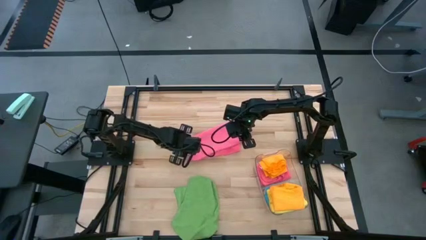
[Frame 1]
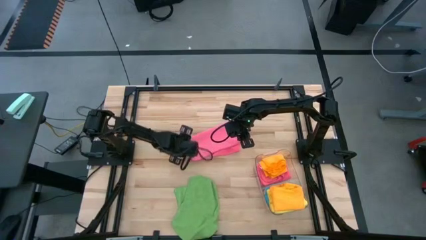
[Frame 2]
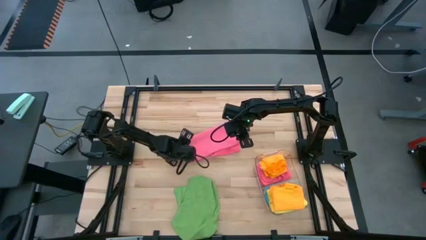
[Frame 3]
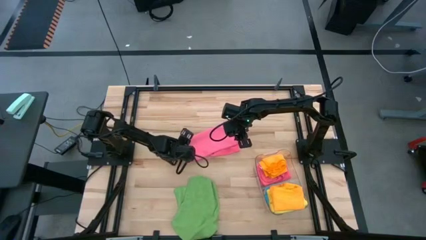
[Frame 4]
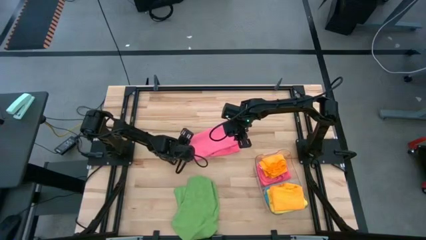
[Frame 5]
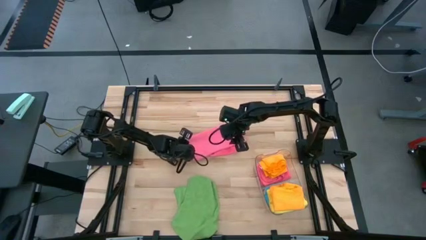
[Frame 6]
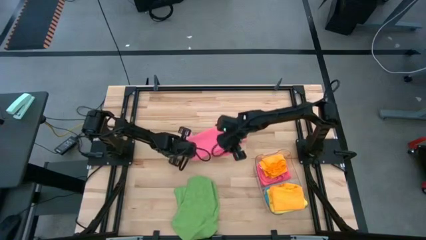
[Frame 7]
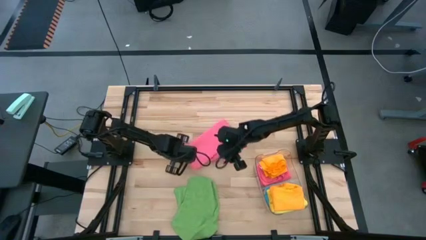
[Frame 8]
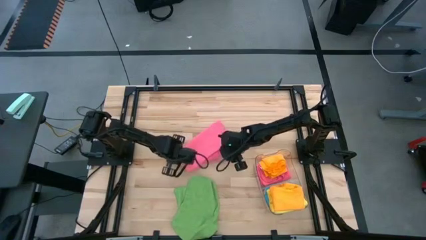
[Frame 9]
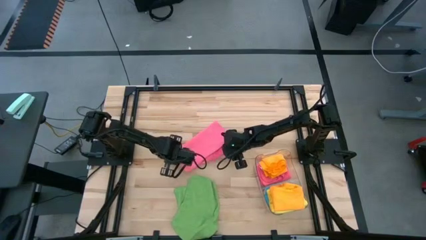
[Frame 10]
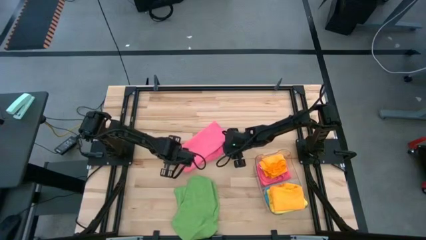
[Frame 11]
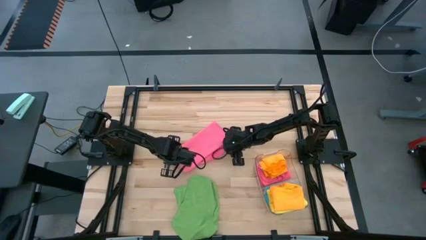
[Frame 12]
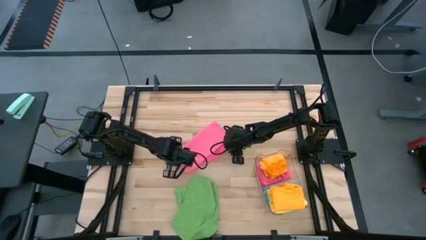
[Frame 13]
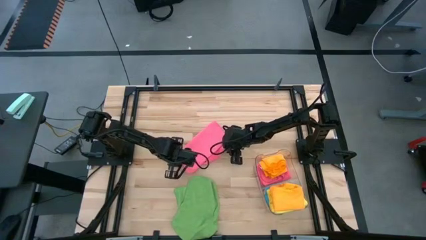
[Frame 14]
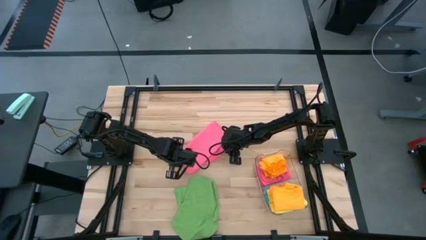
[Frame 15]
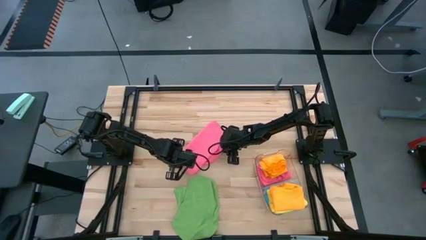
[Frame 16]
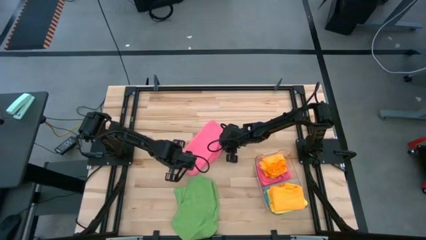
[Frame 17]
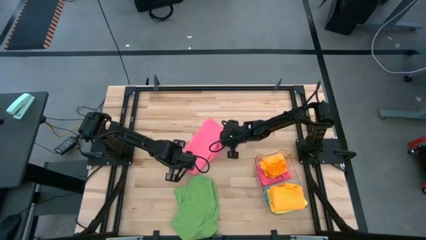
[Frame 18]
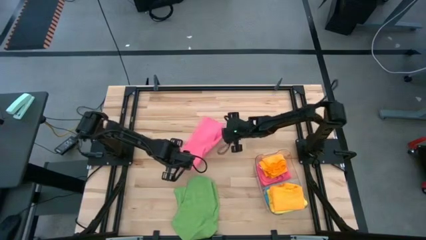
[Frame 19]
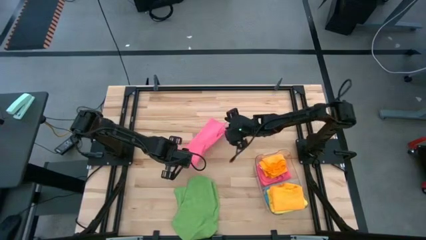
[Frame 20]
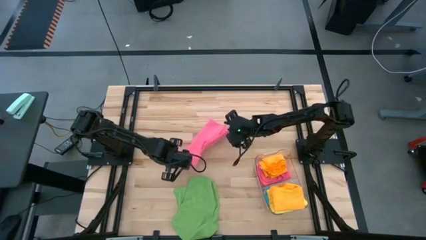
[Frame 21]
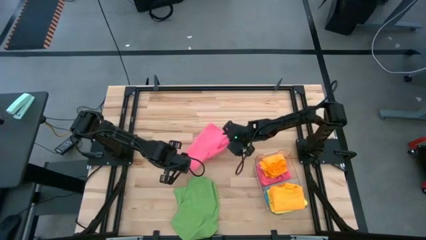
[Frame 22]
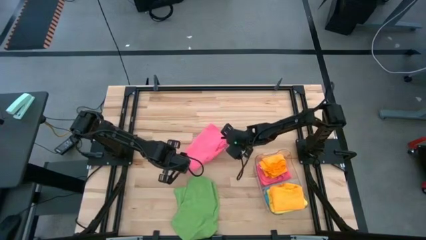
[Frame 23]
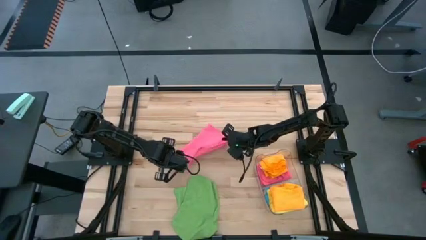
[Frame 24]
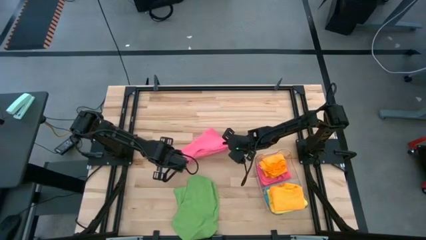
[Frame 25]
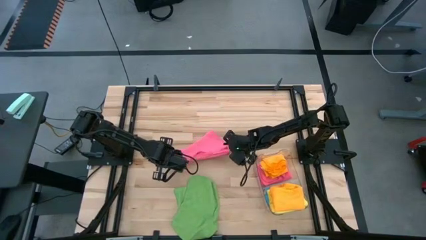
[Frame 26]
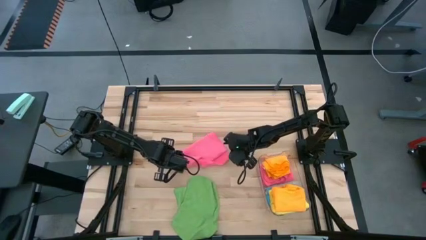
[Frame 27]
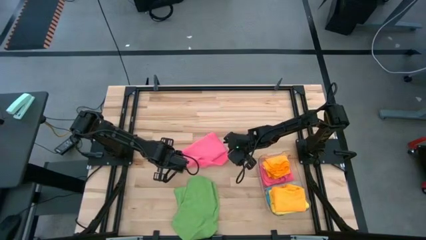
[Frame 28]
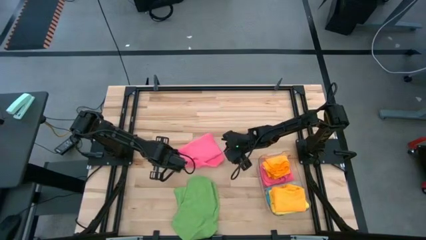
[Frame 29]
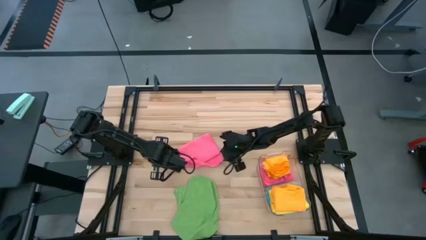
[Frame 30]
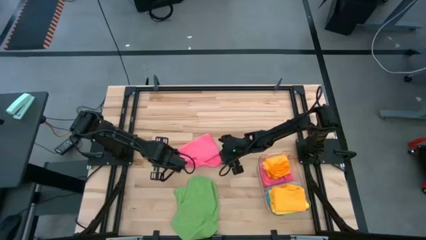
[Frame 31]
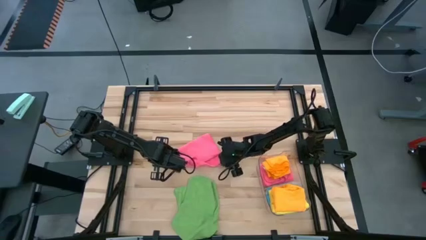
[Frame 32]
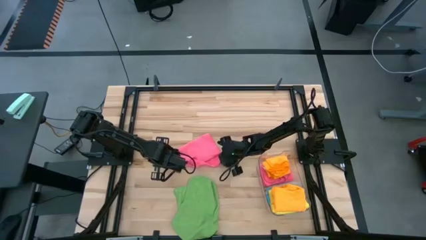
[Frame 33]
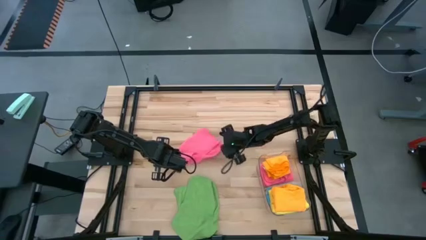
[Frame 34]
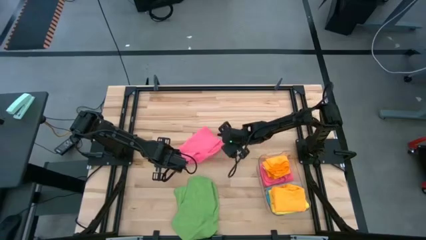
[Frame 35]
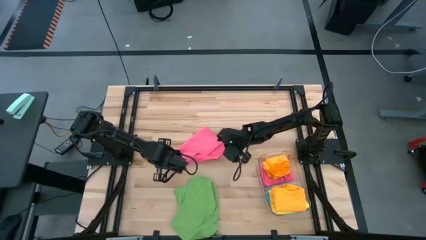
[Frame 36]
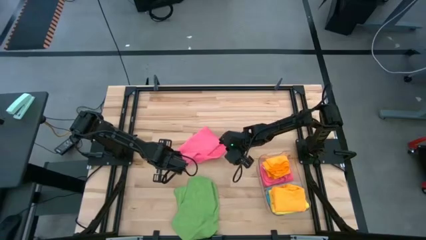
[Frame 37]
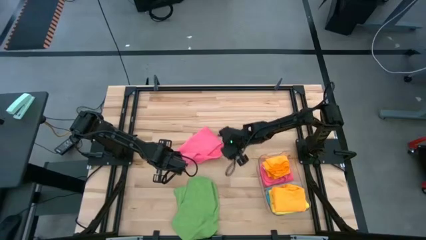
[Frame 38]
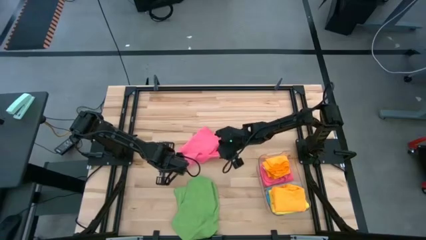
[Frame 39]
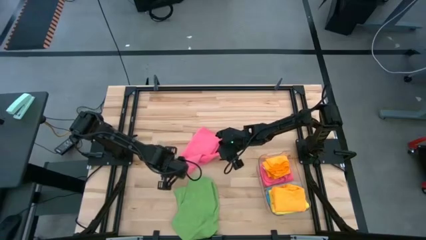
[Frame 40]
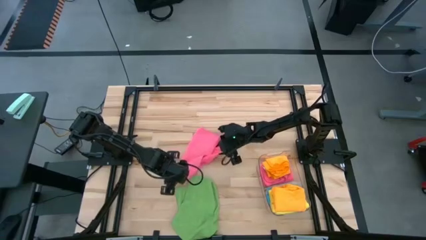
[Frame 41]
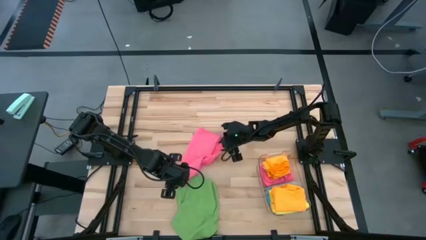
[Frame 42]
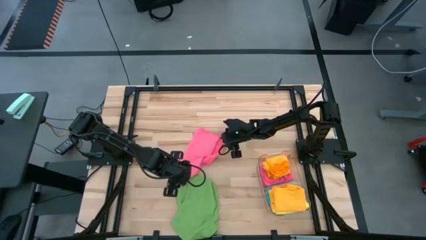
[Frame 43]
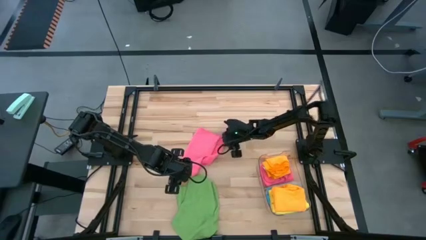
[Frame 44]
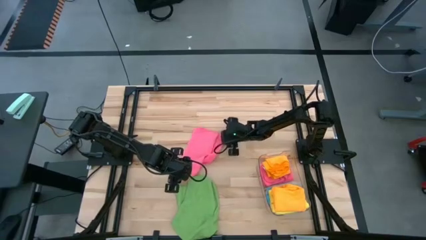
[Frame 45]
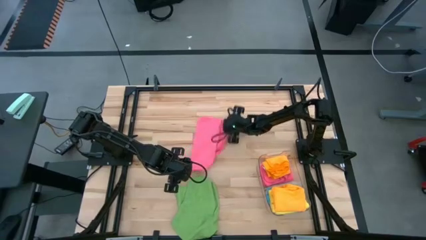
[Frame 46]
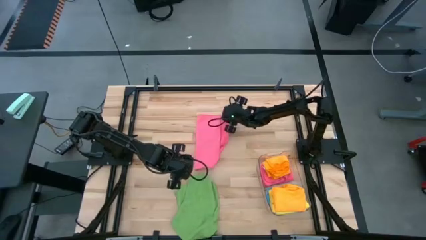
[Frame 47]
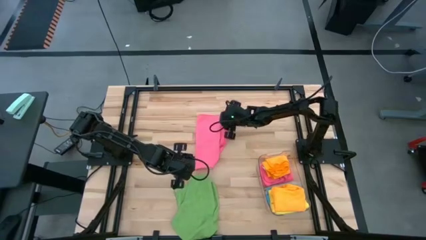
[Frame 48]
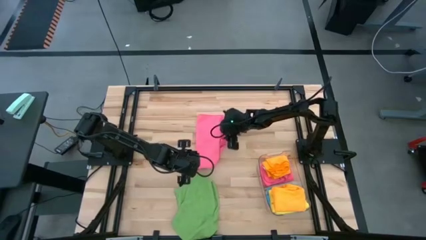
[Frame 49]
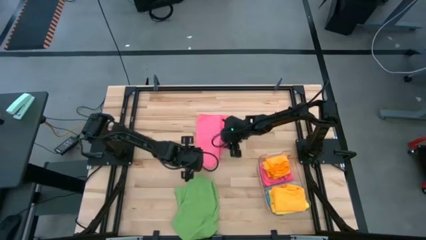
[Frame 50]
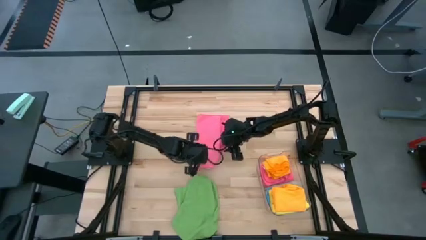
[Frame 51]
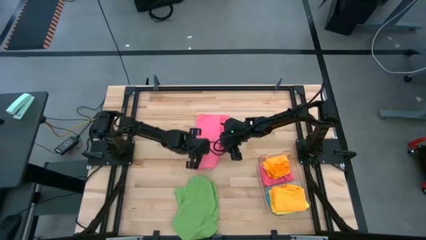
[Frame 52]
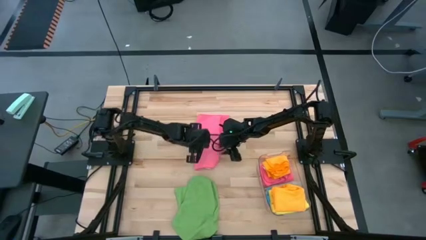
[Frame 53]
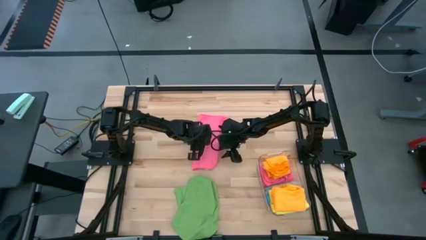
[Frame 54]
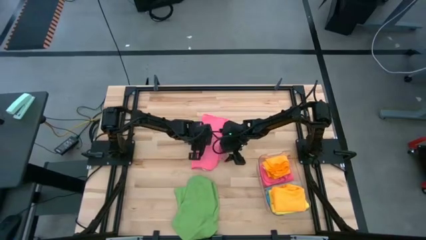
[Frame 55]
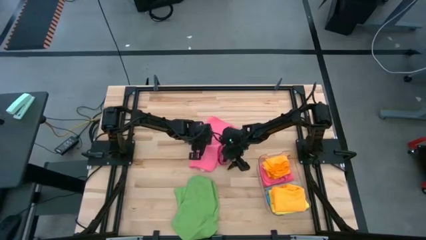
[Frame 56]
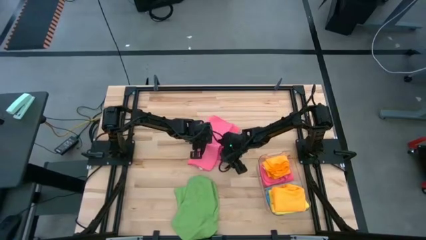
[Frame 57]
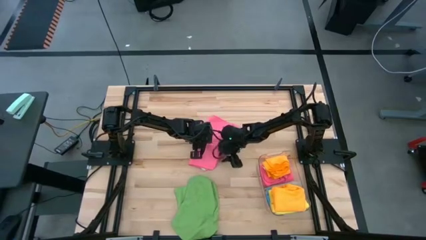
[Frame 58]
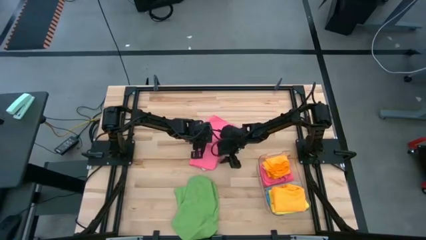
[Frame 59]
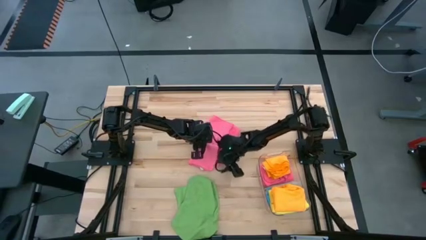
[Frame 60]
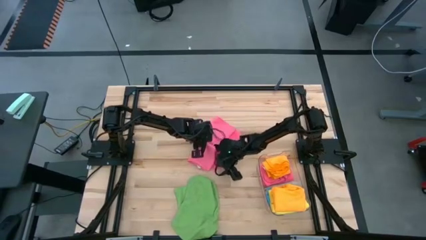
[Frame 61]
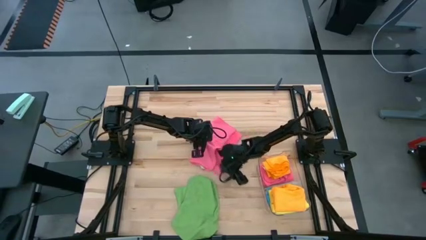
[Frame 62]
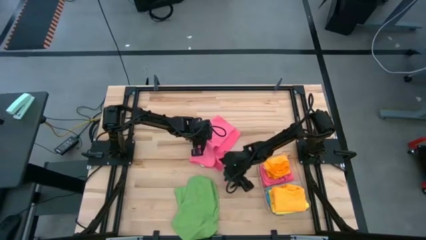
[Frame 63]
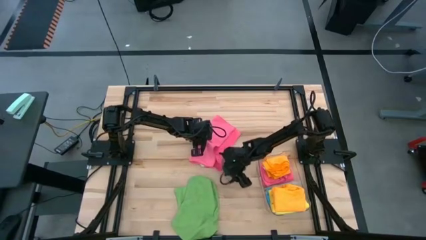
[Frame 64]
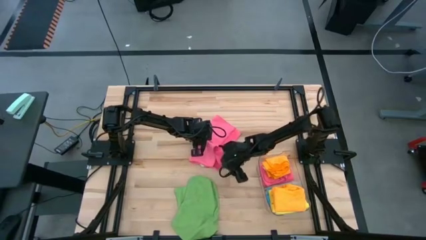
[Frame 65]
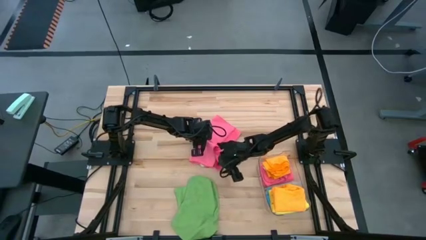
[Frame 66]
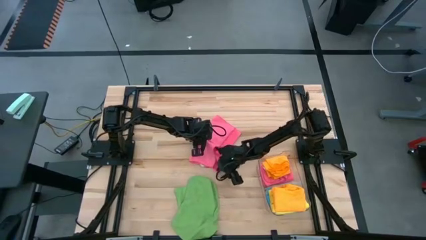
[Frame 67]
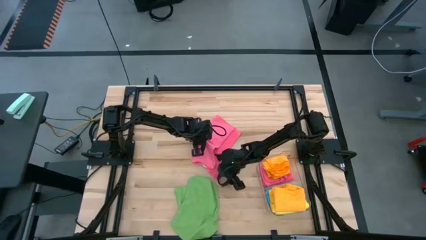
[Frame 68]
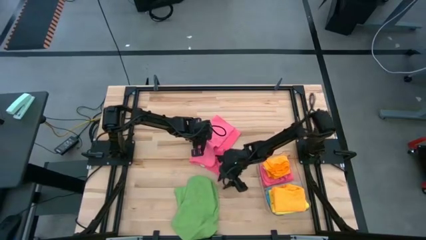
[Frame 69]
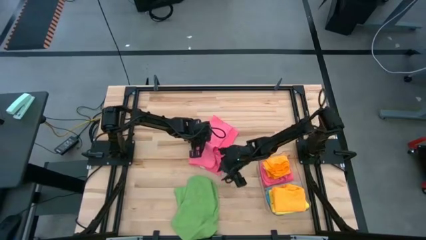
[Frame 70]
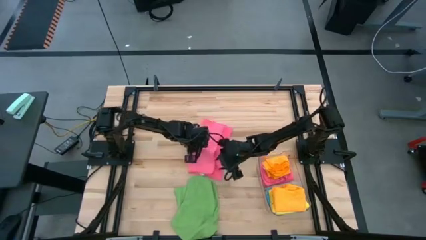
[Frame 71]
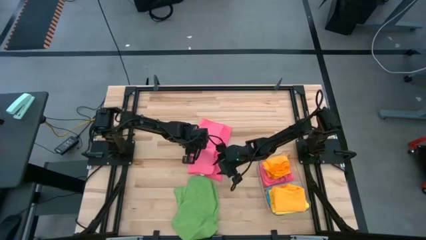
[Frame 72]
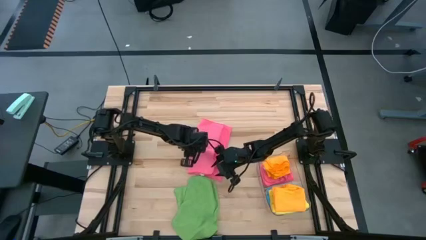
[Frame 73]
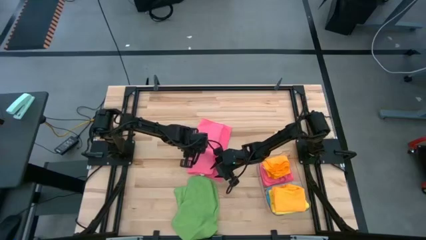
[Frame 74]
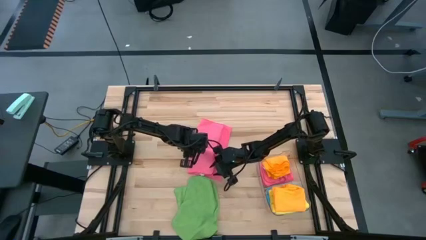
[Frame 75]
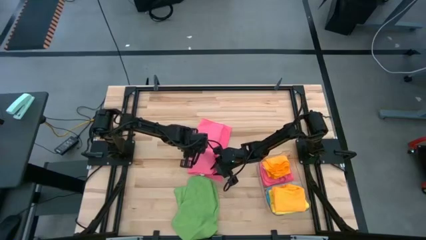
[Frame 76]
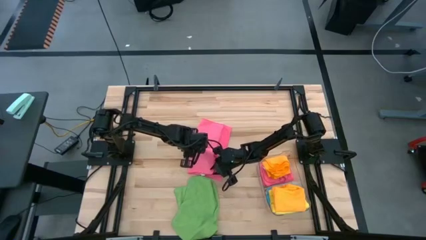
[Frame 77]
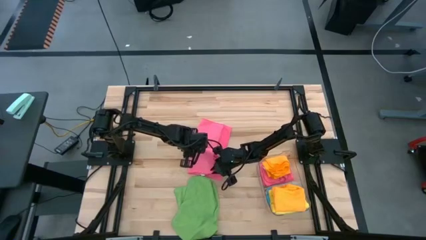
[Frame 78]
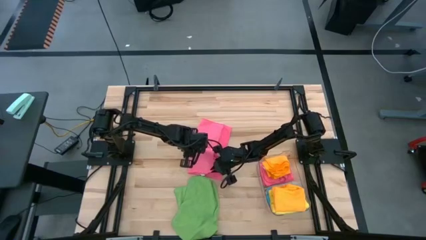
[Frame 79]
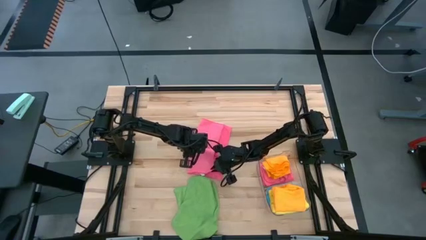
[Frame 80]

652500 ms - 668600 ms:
Task: Fold microfiber towels
Fold the pink towel
